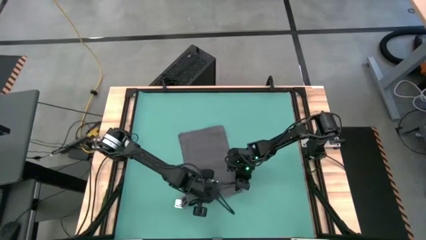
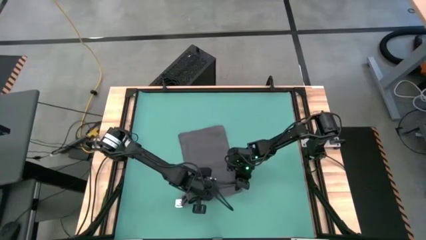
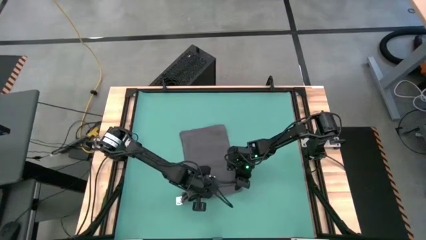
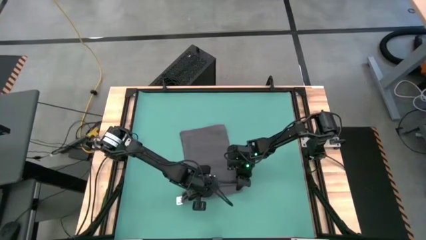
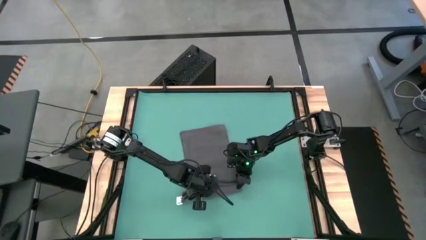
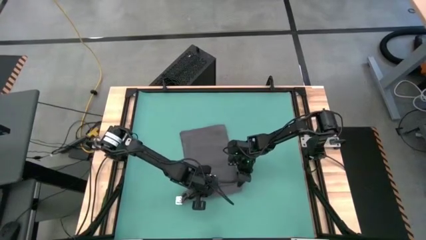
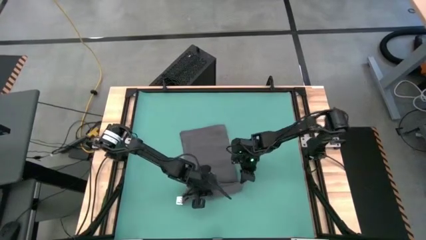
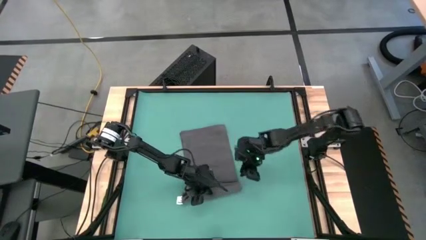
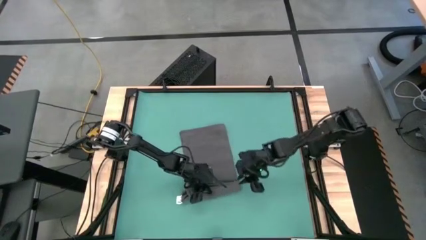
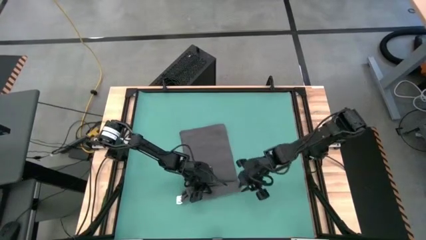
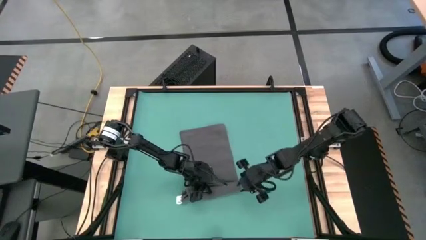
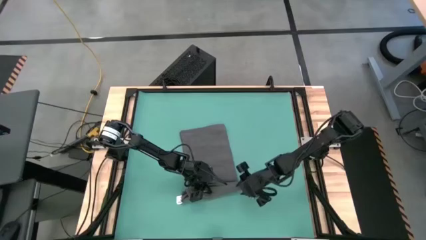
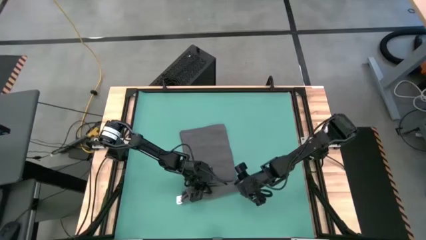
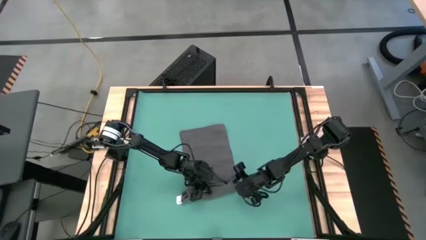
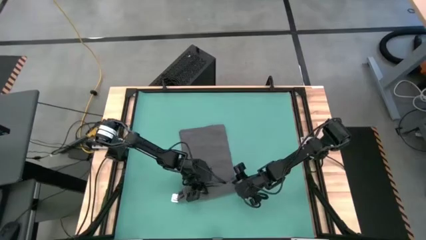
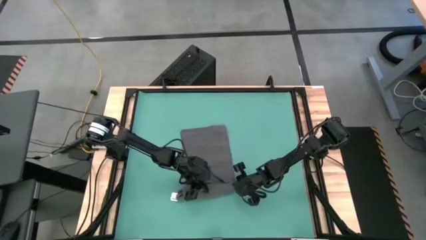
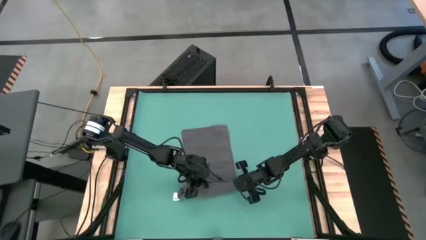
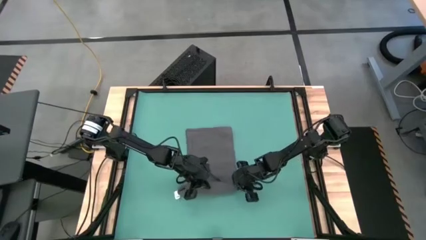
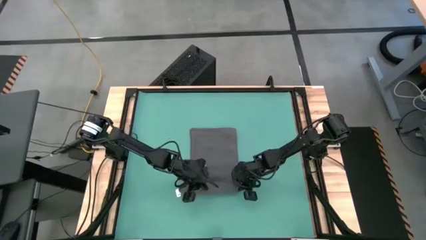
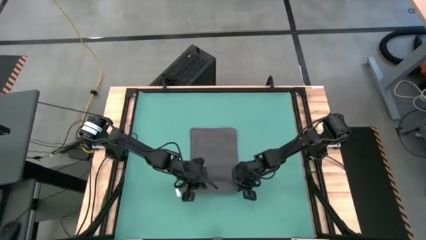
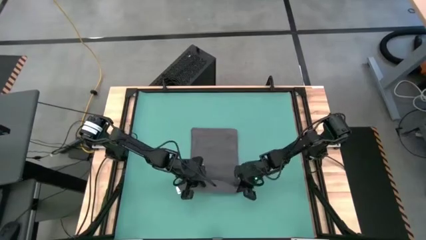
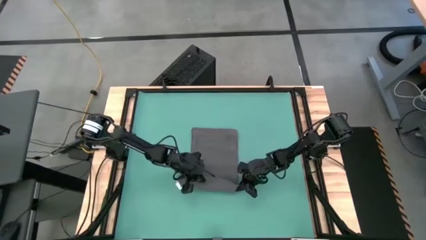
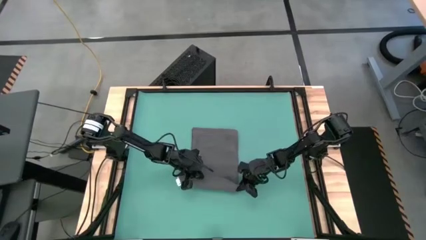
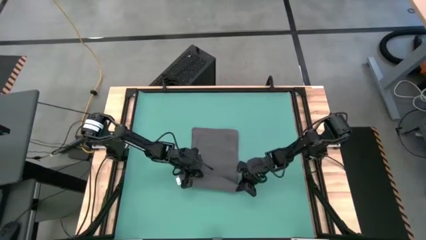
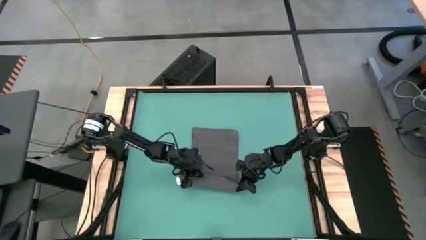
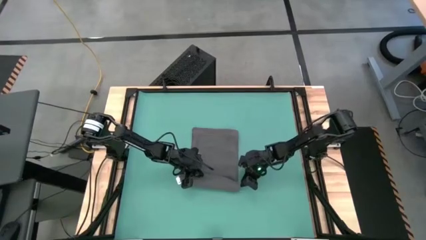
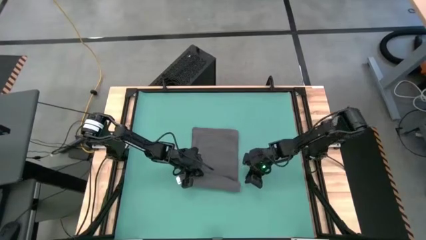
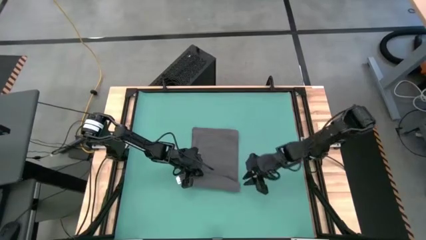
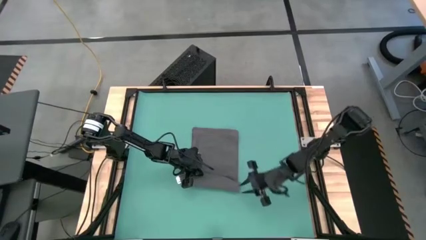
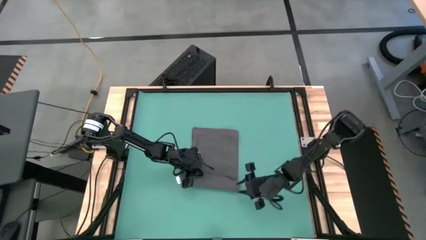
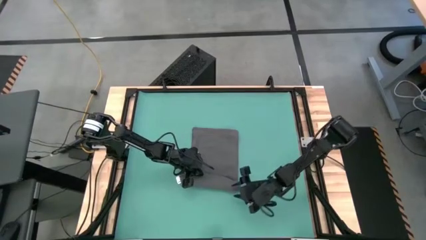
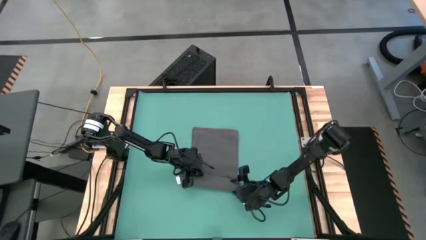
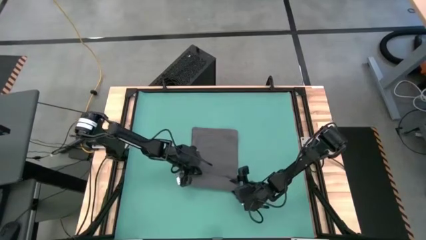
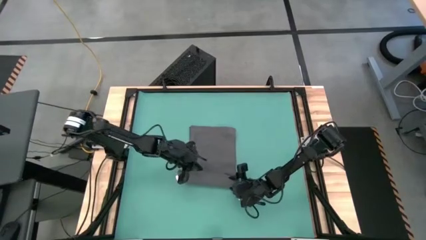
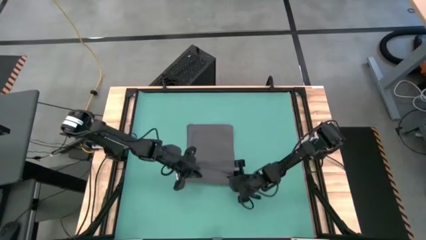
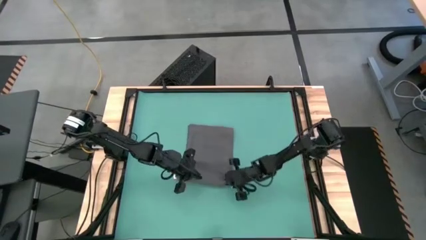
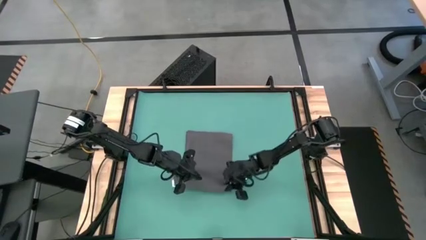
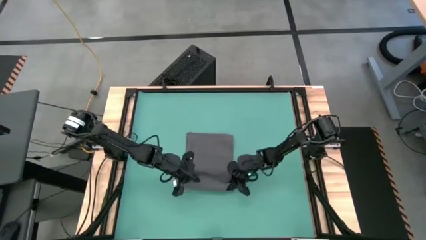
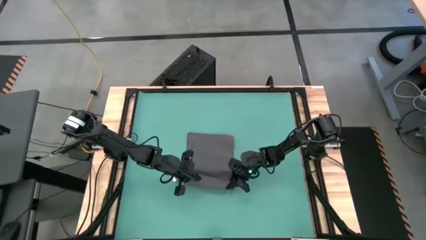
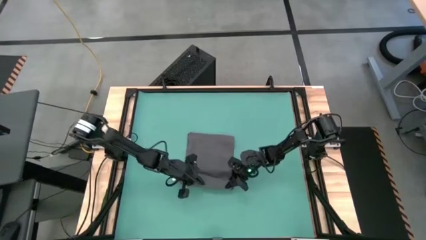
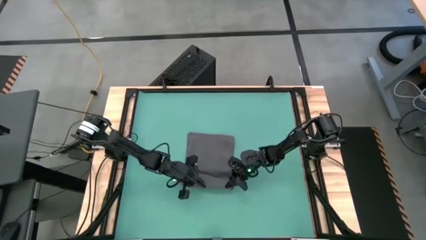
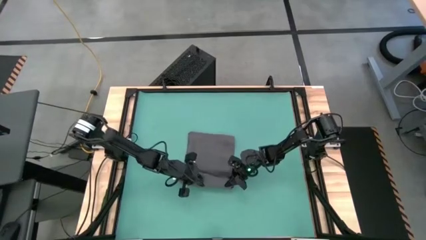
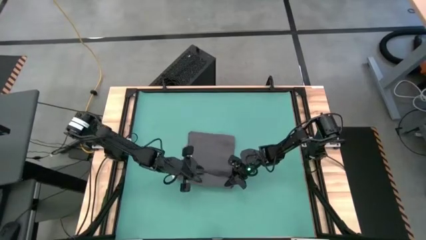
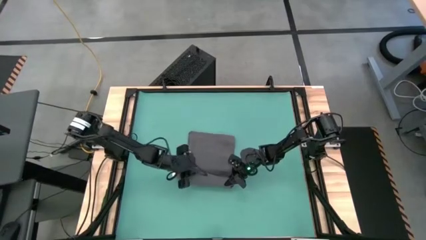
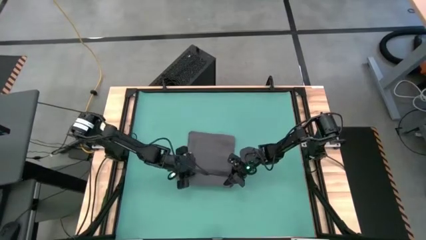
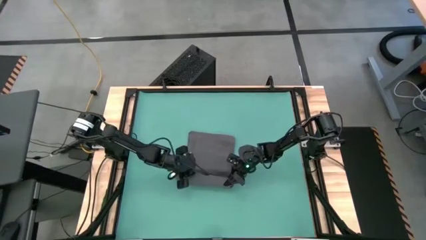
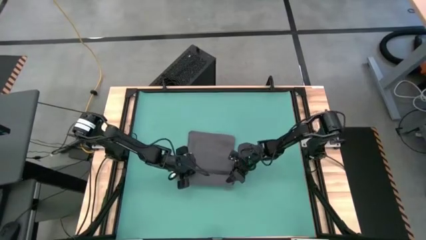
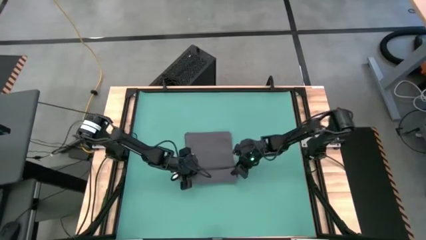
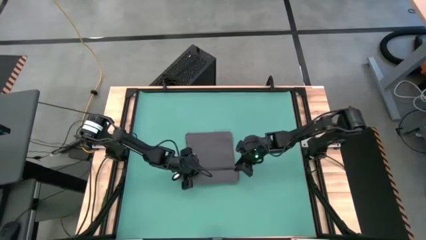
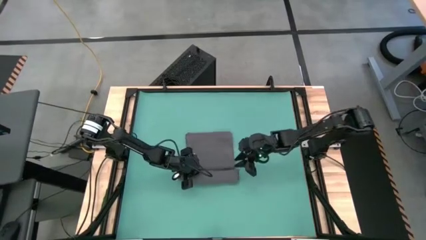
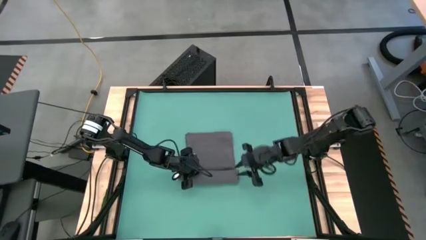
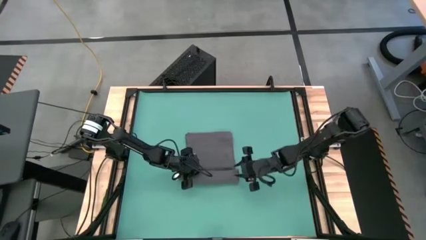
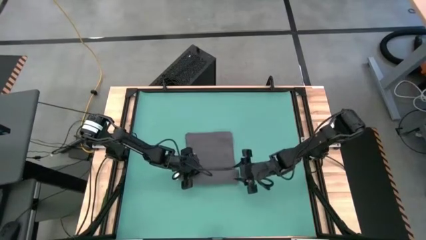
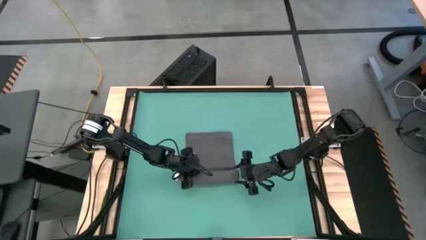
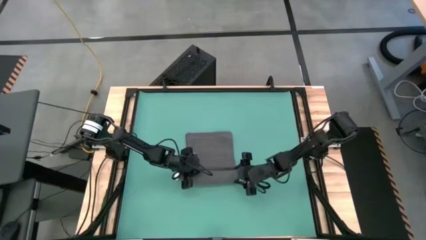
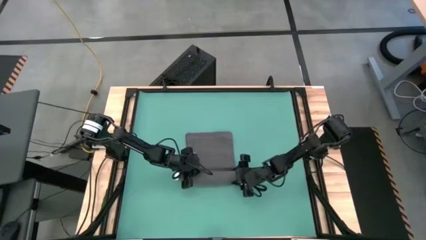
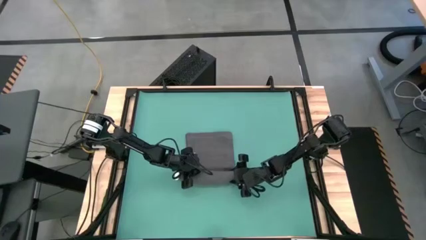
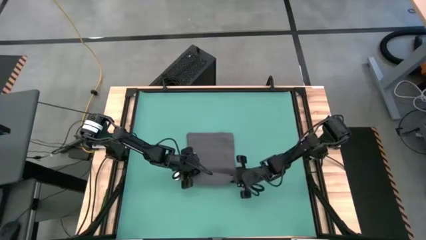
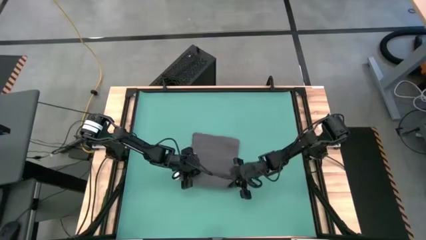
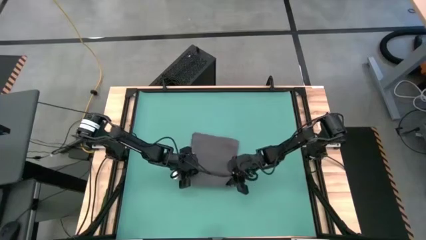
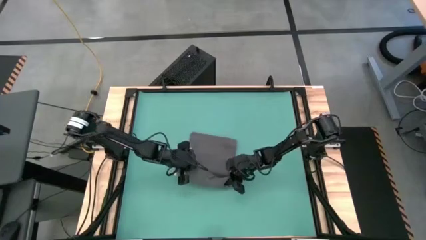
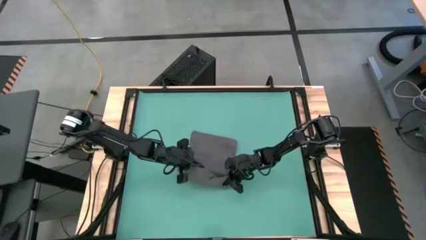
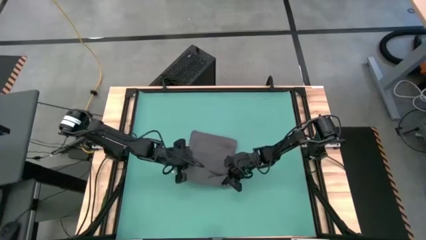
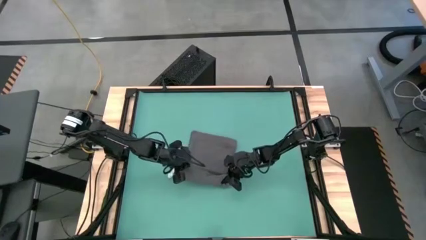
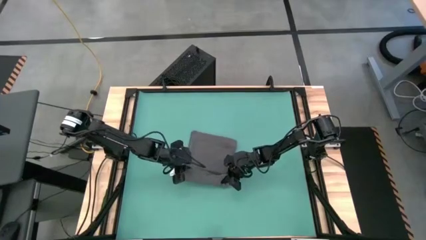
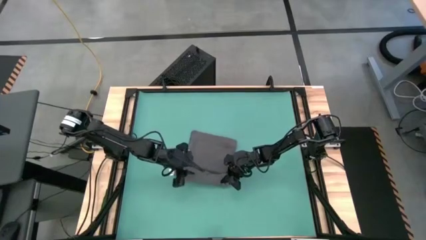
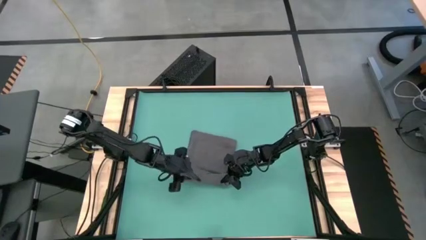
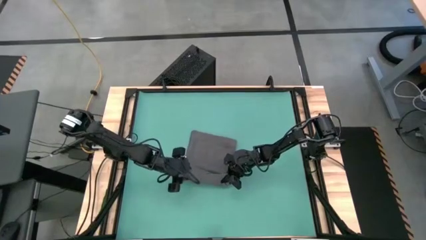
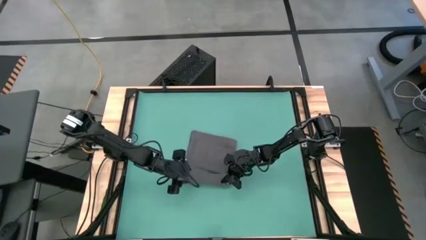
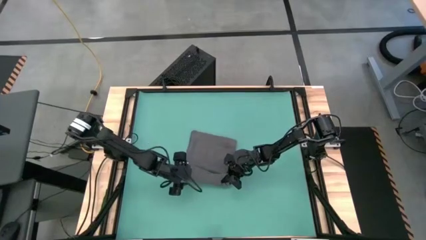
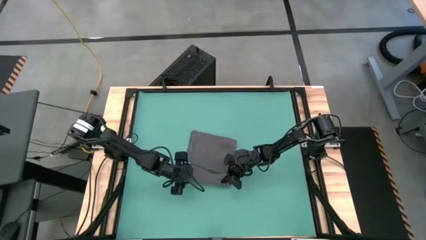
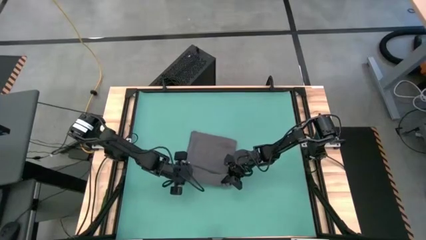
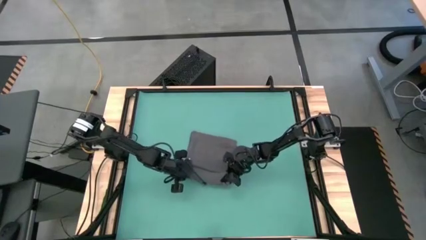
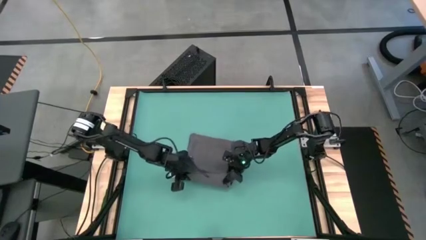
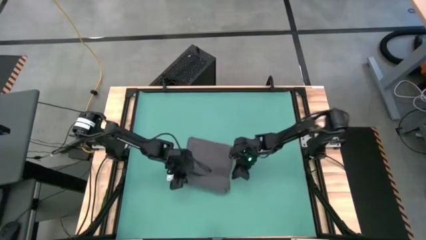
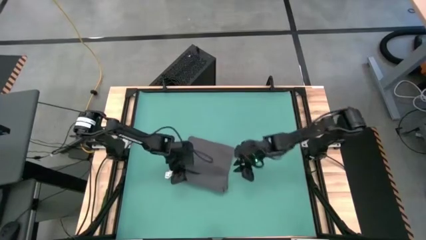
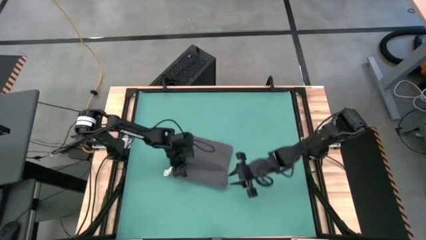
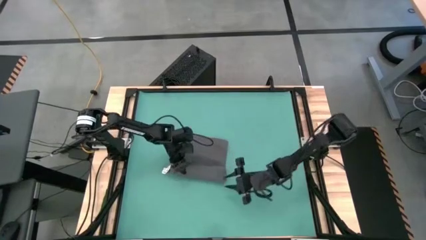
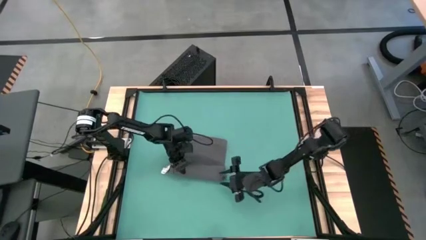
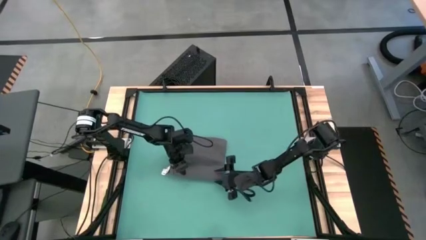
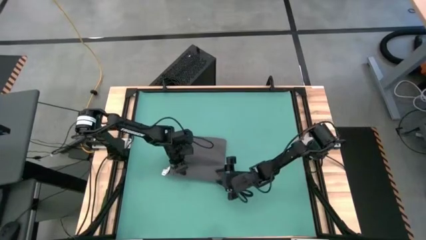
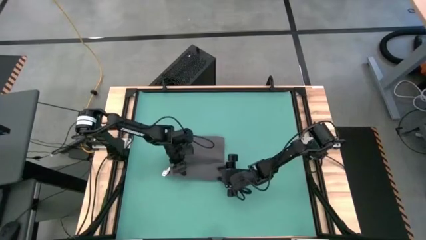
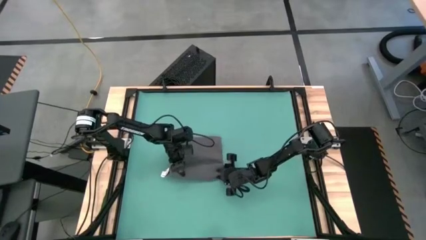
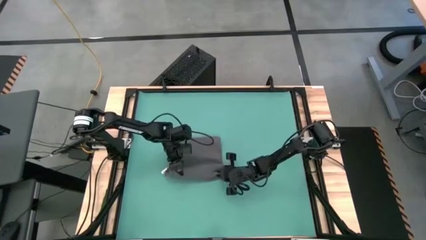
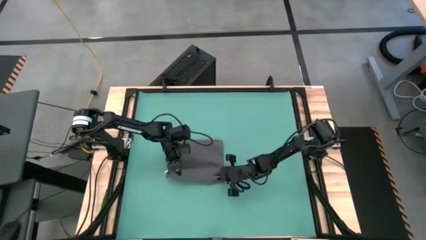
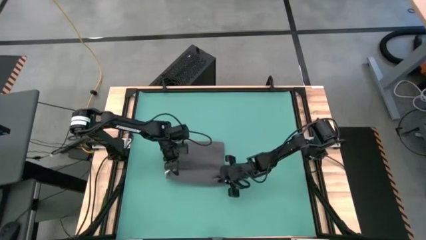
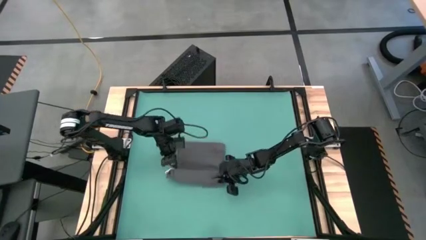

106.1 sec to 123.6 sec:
Task: Roll towel into tight, uniform cylinder
Roll the gray towel
